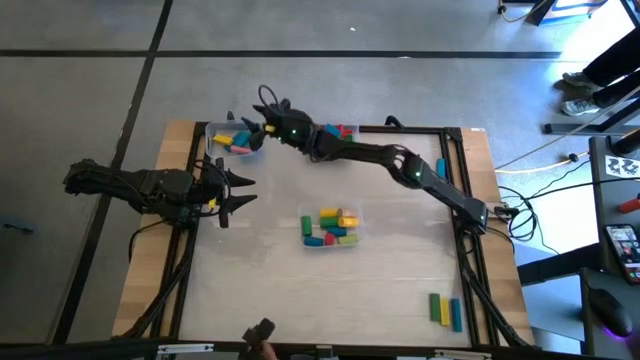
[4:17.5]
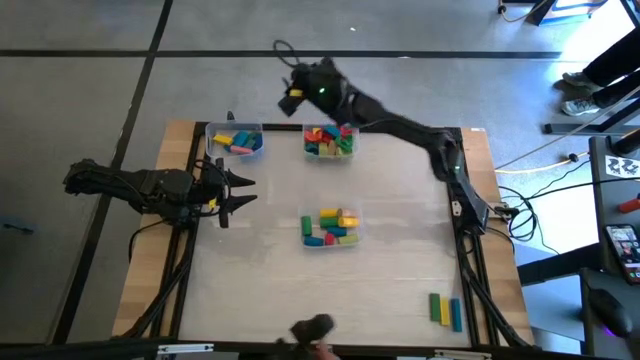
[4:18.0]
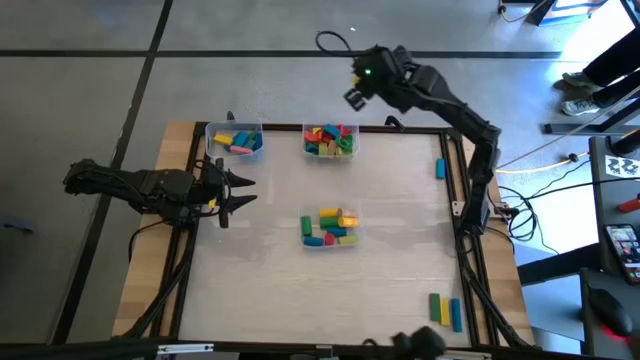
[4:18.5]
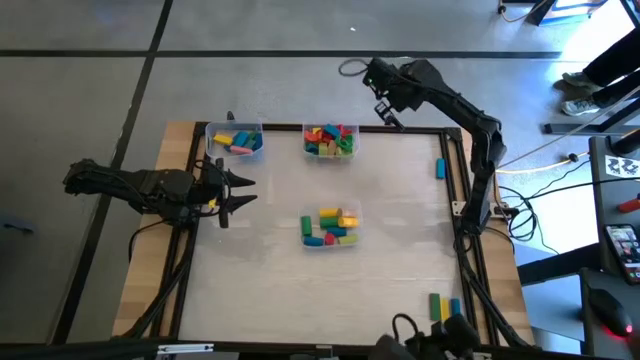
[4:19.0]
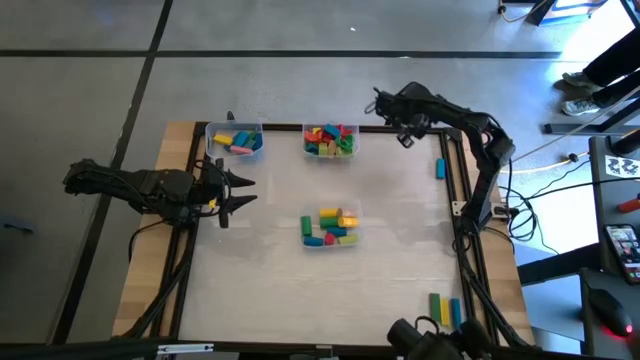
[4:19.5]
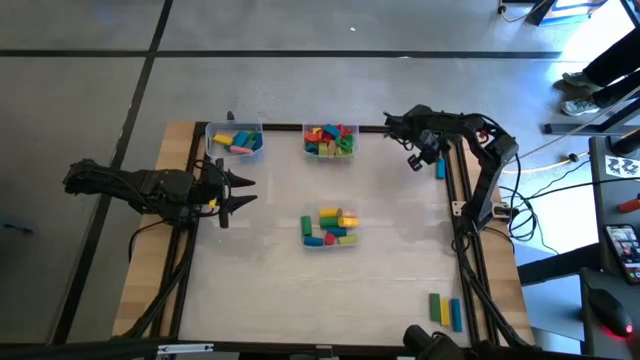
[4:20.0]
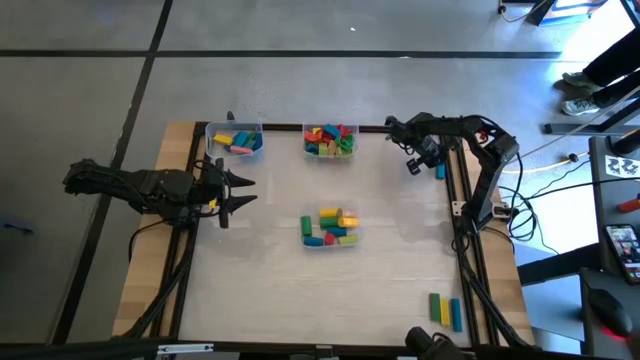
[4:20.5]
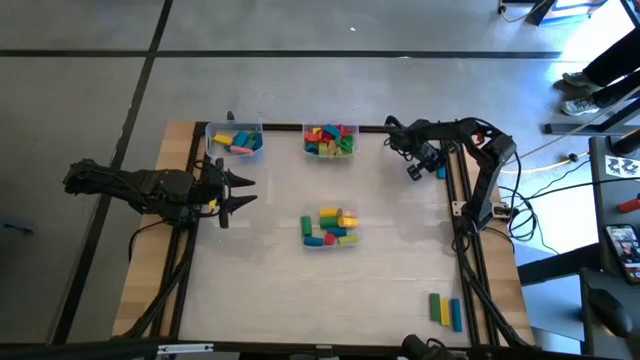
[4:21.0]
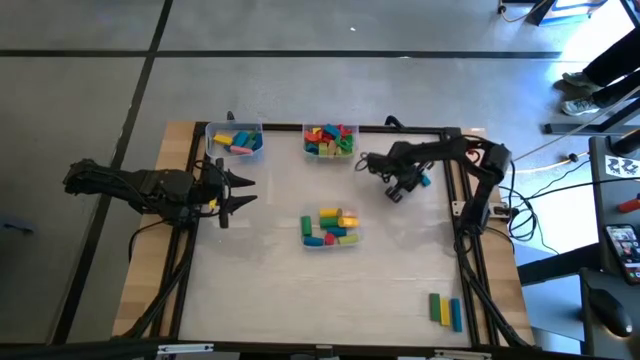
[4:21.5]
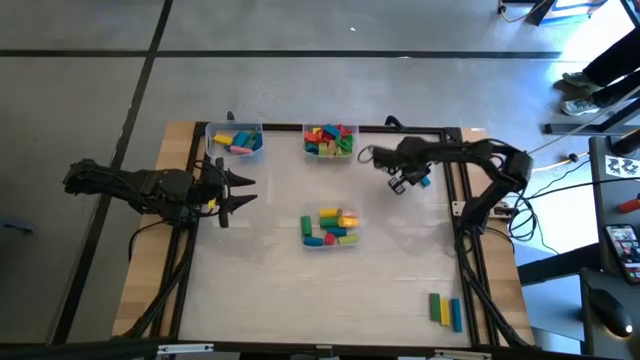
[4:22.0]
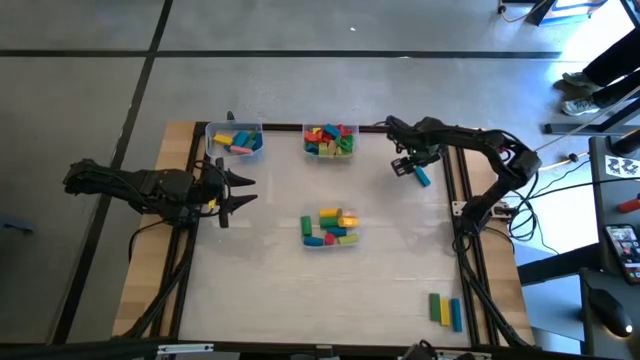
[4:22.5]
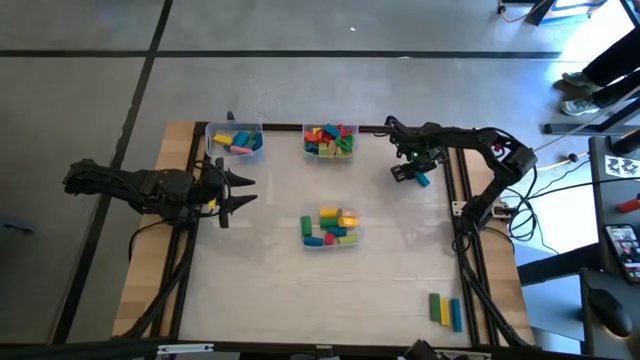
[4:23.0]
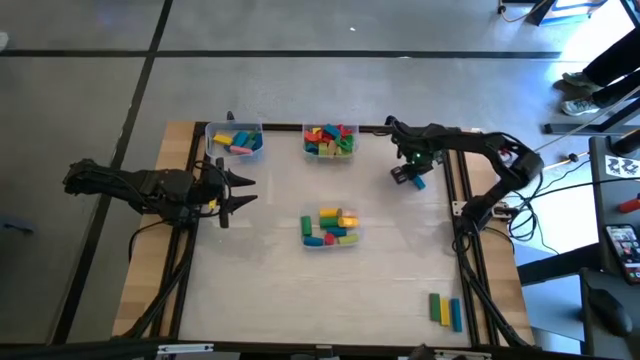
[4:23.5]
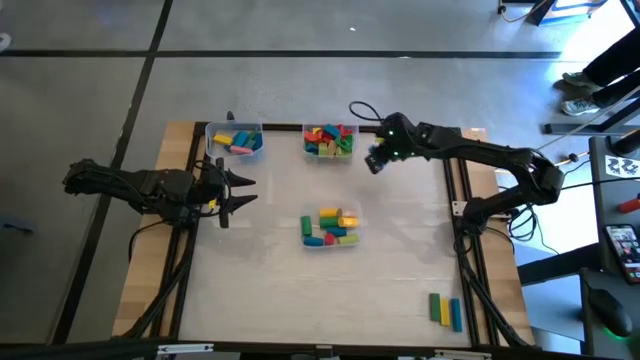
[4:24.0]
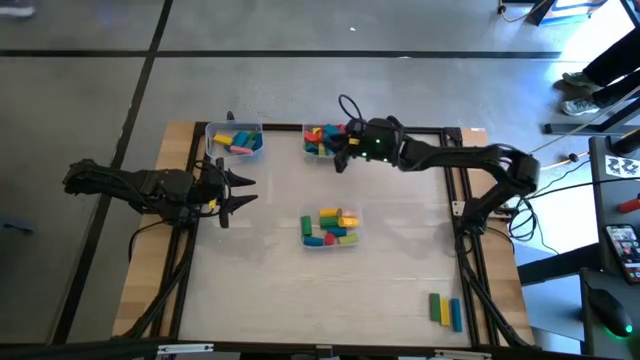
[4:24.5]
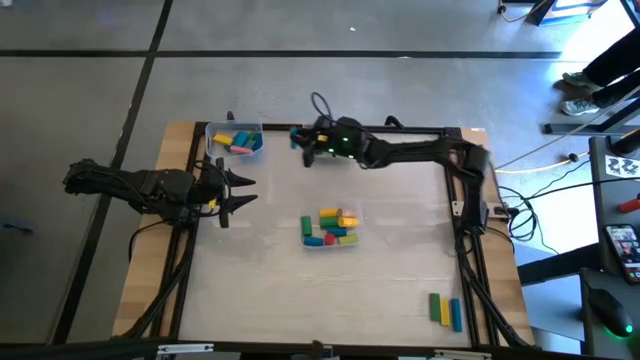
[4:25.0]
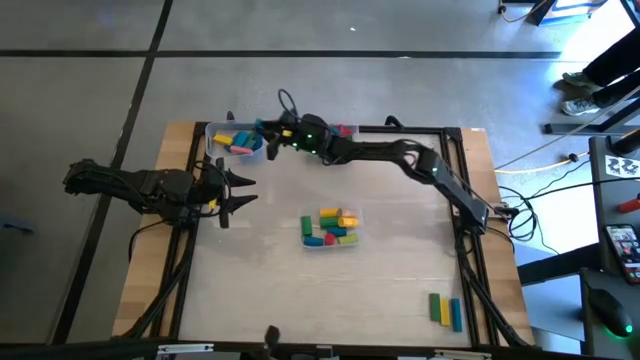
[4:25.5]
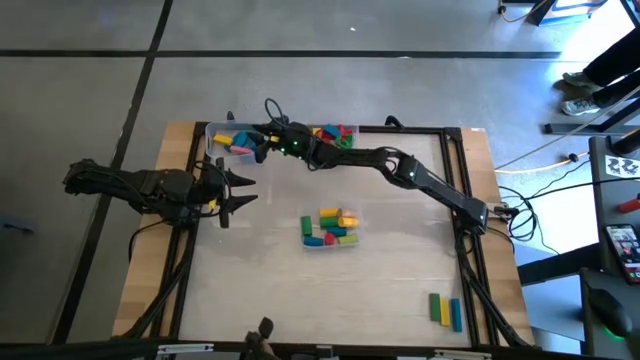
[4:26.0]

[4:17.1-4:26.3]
Task: Sort blocks by size
Put the light blue rectangular block into the top left transparent bin

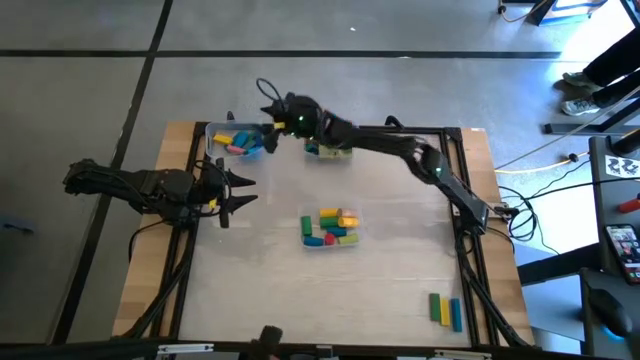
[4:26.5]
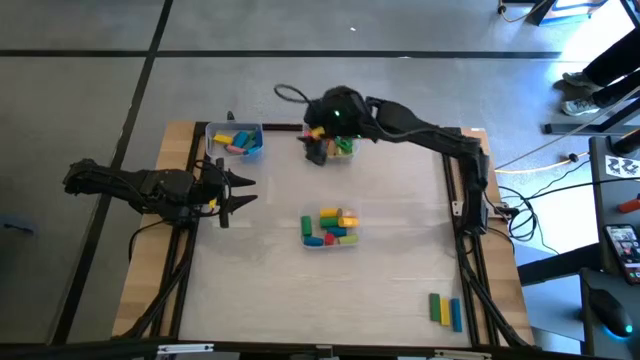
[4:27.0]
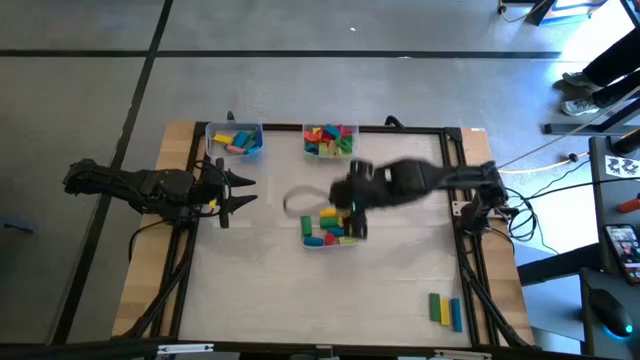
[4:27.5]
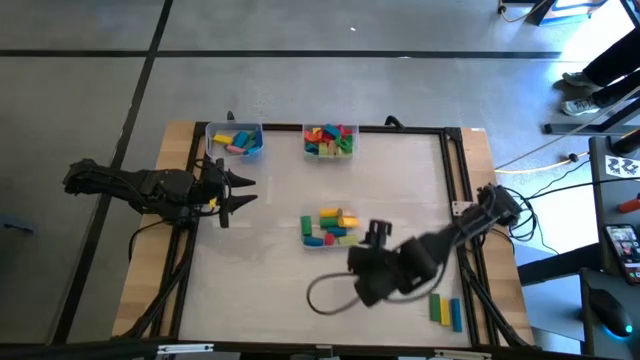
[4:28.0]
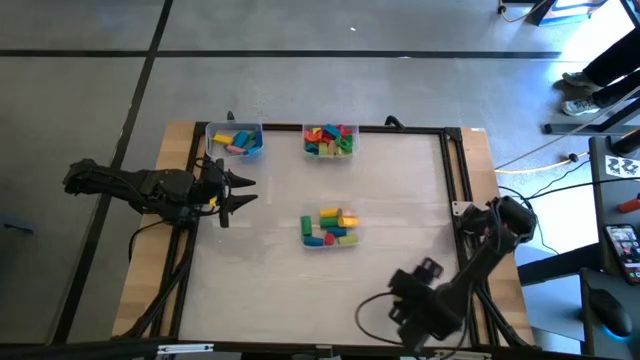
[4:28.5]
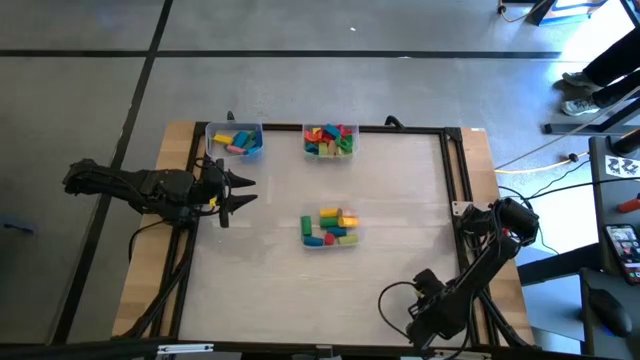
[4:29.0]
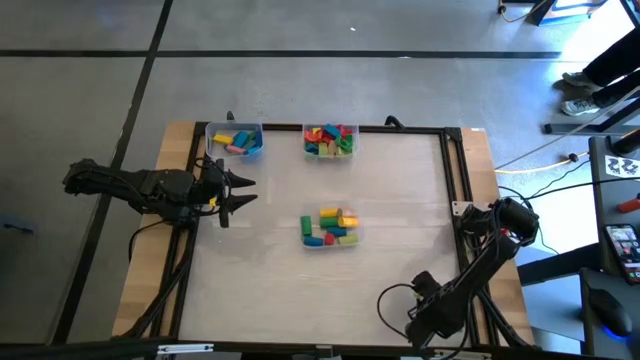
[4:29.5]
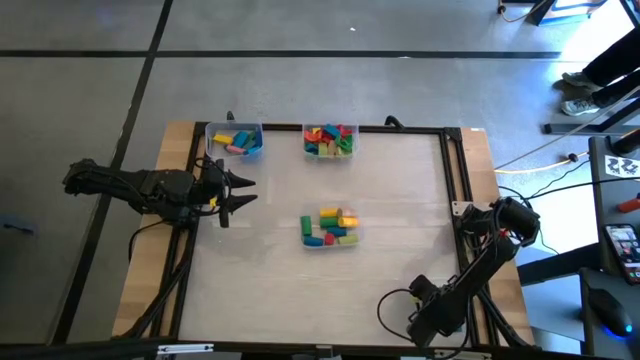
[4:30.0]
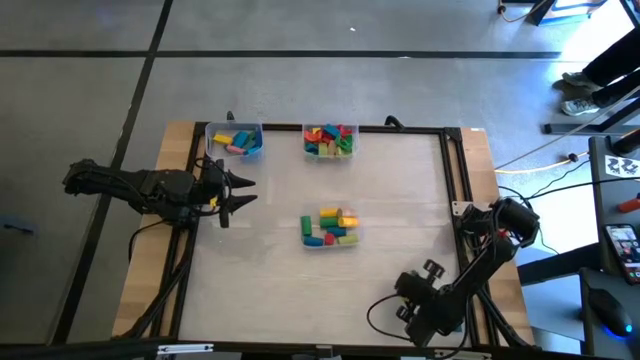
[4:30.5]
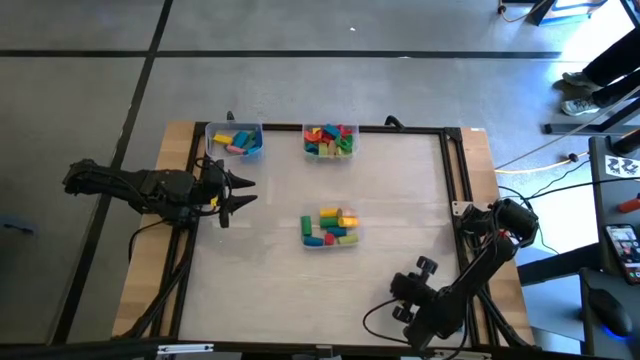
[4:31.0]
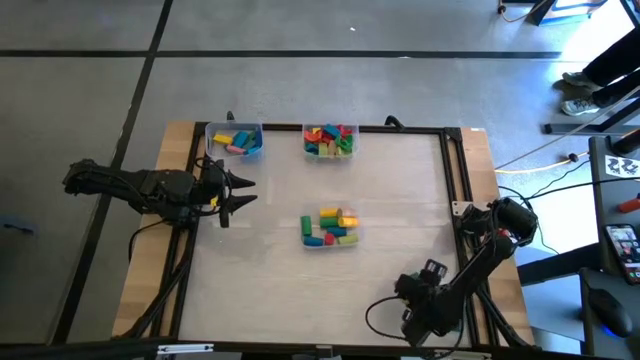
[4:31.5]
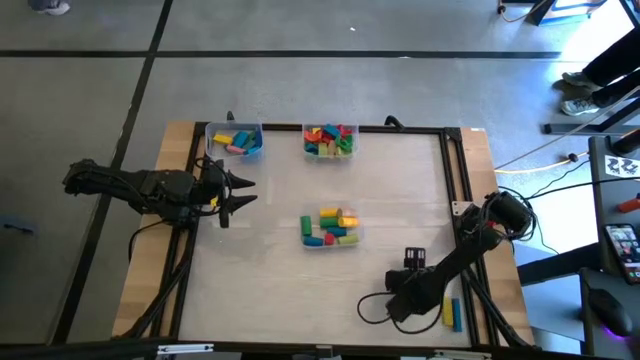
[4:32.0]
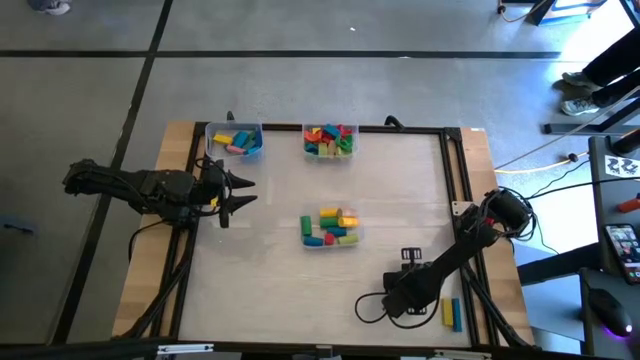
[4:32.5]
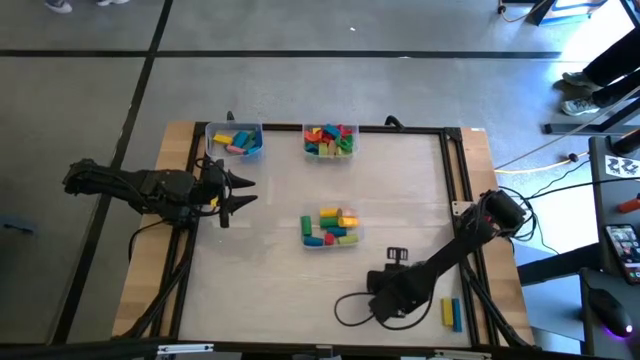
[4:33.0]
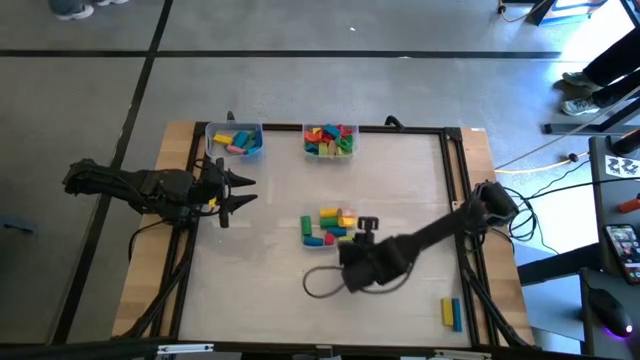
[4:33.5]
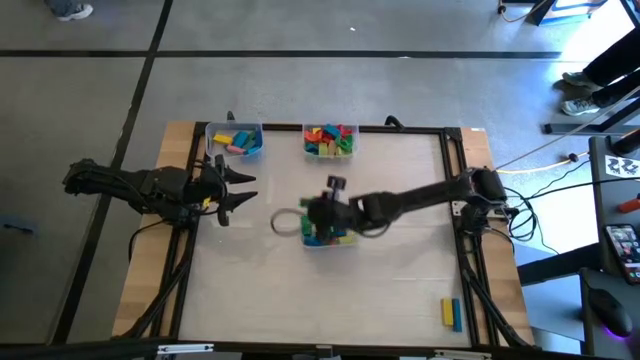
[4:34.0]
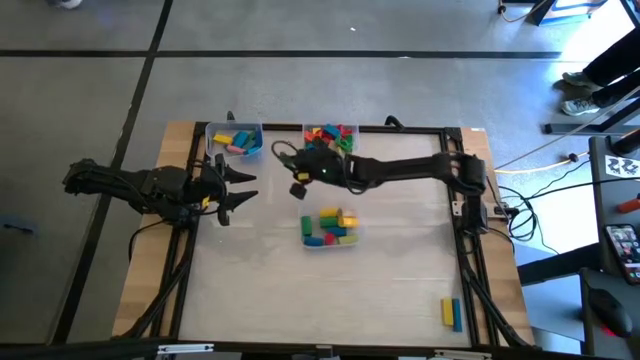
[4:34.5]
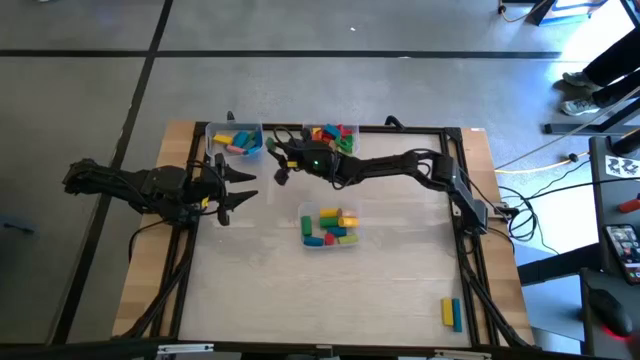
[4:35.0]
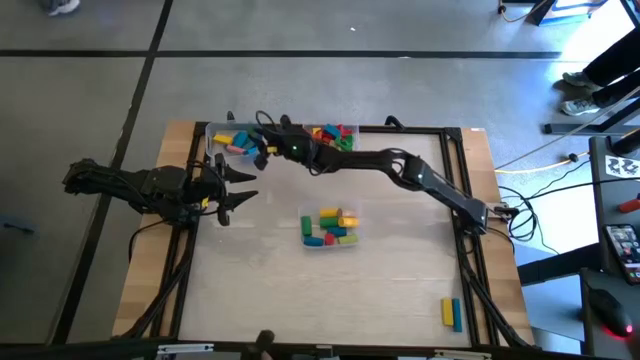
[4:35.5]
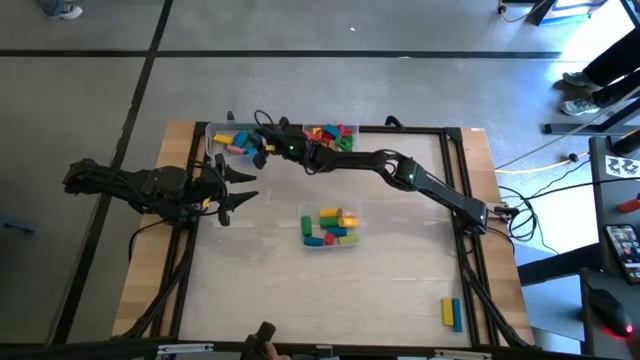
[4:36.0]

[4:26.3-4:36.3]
Put the green rectangular block into the top left transparent bin

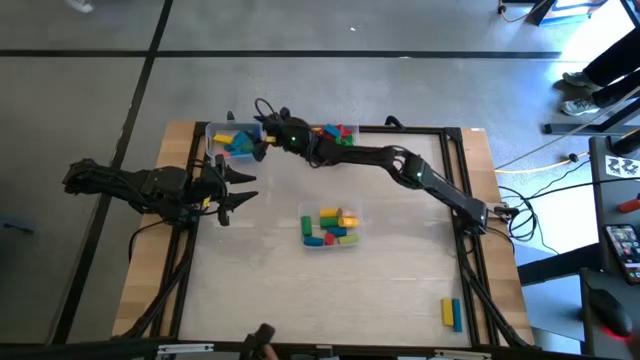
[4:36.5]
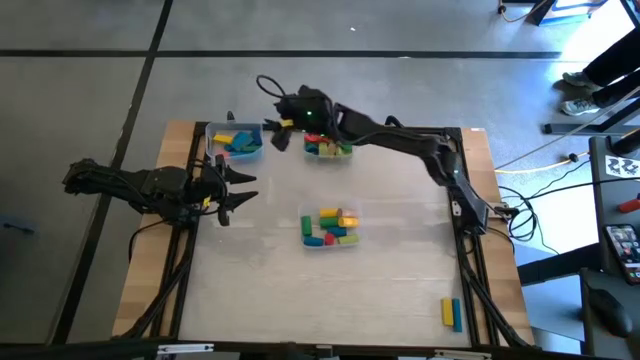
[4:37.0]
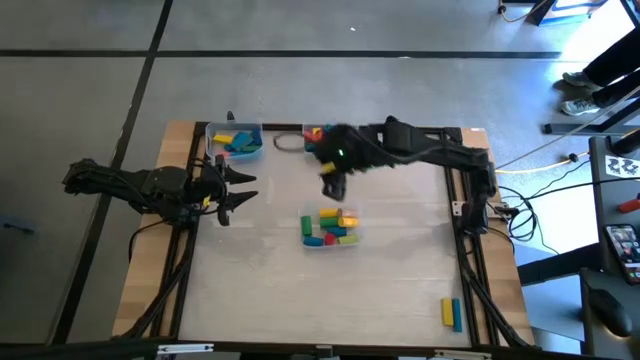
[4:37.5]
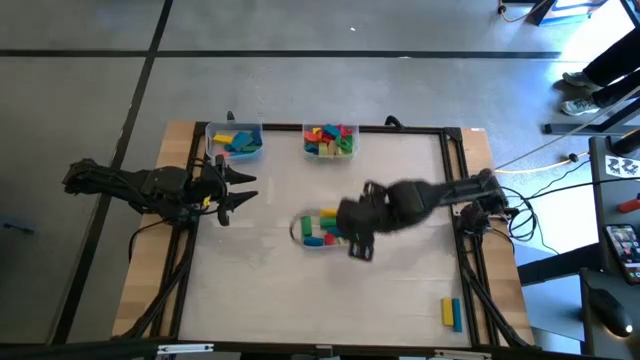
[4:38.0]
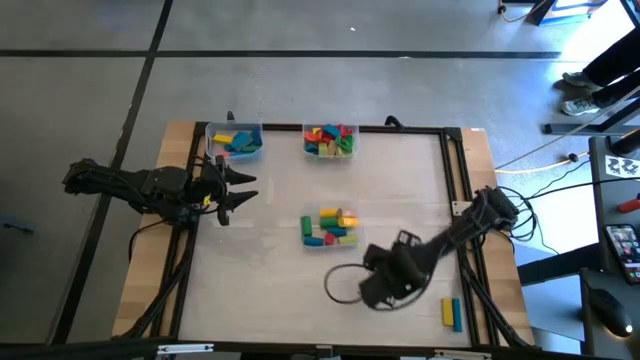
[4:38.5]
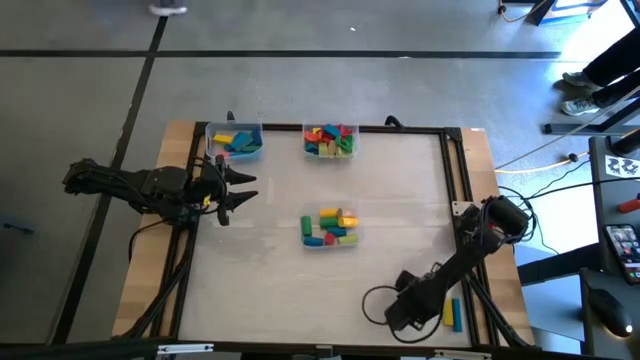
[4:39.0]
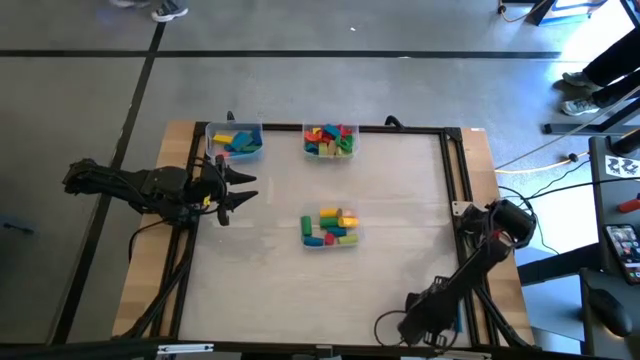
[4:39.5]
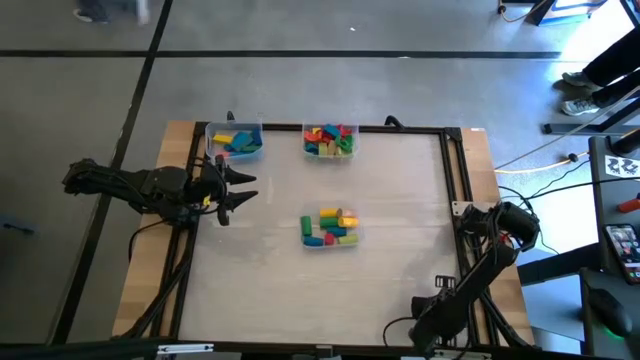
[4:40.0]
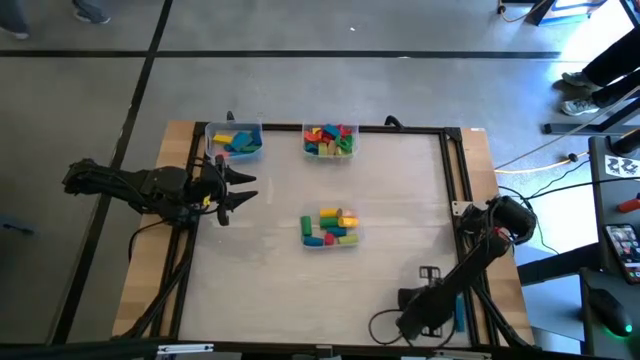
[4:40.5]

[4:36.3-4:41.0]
Move the yellow rectangular block to the center of the table
